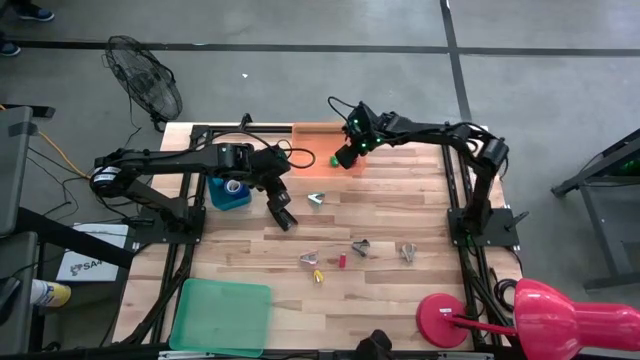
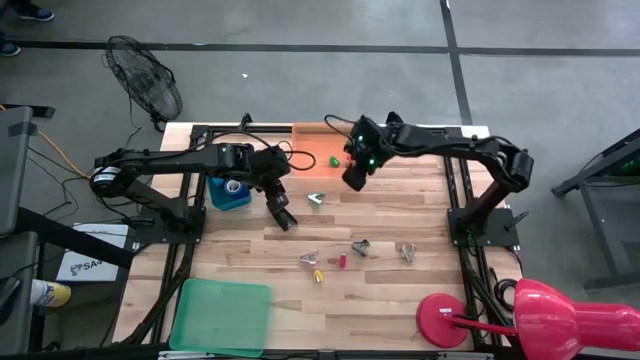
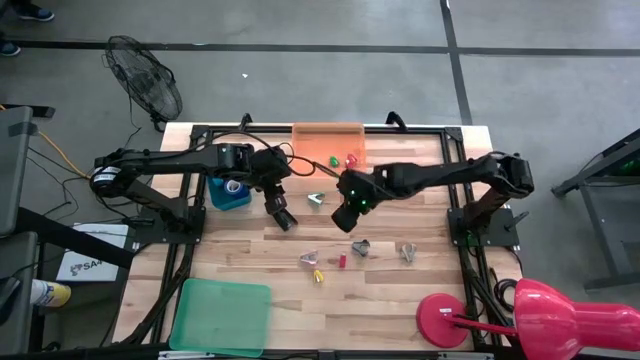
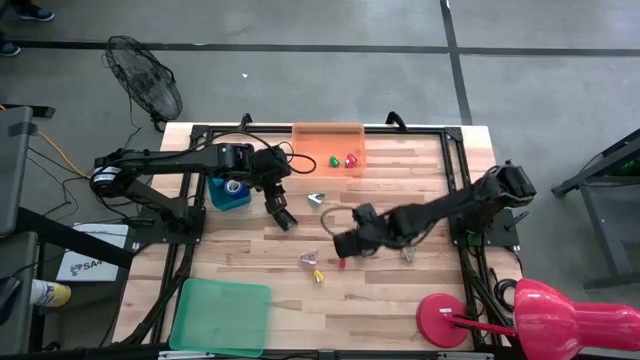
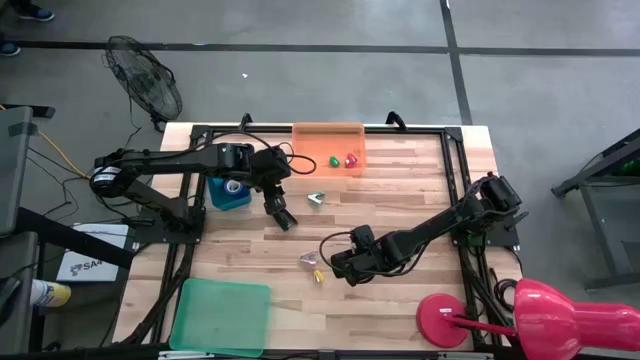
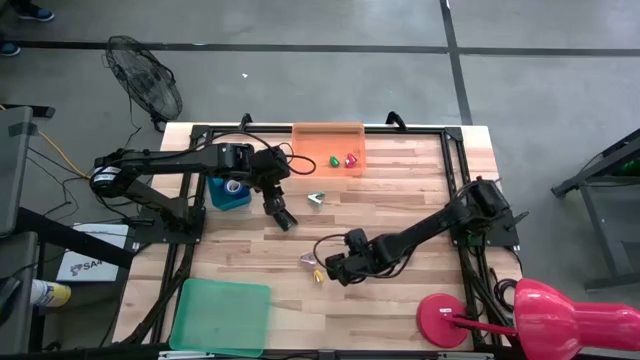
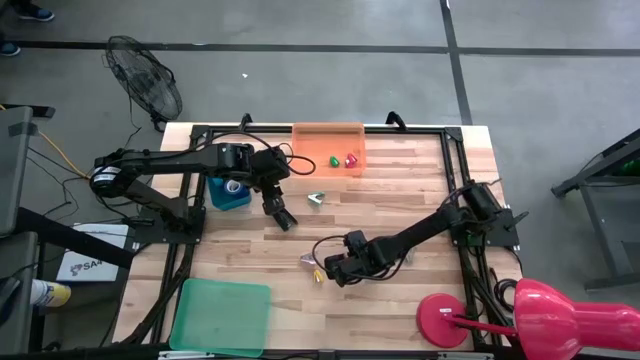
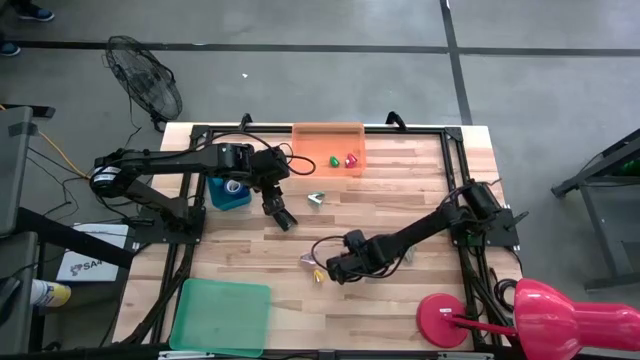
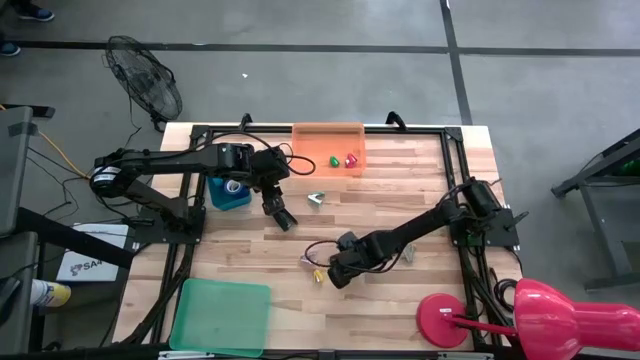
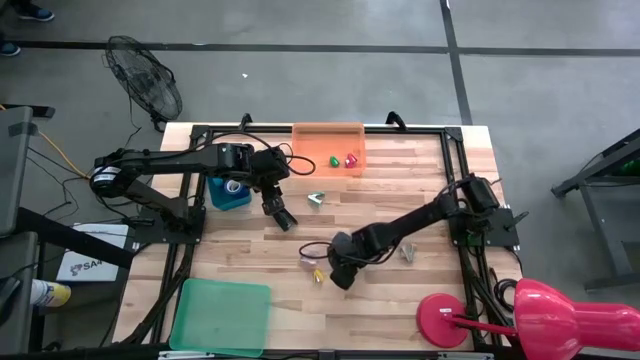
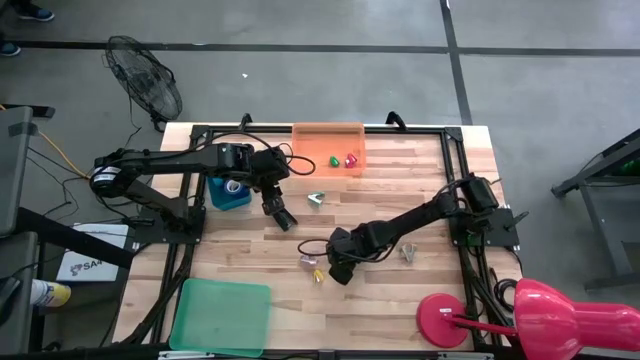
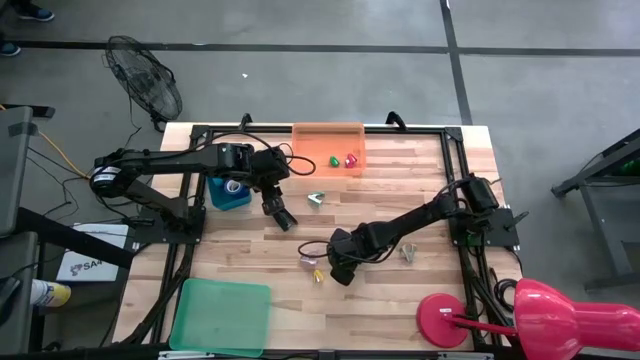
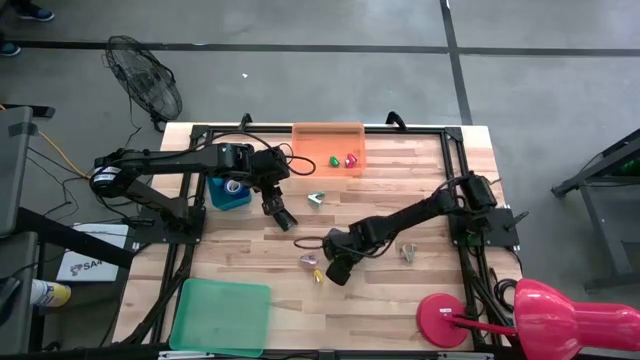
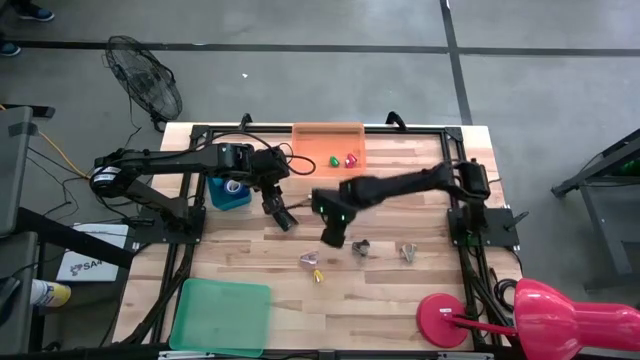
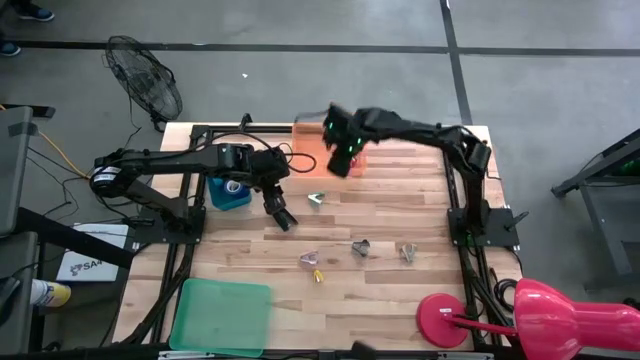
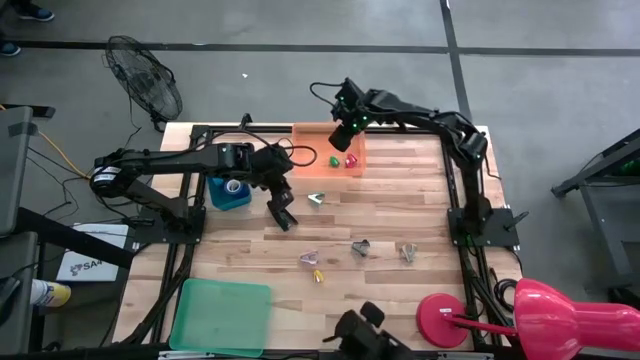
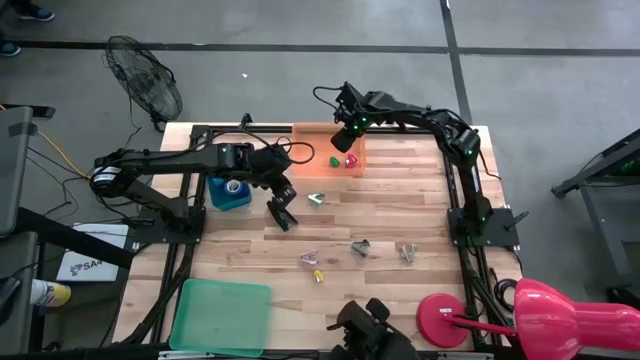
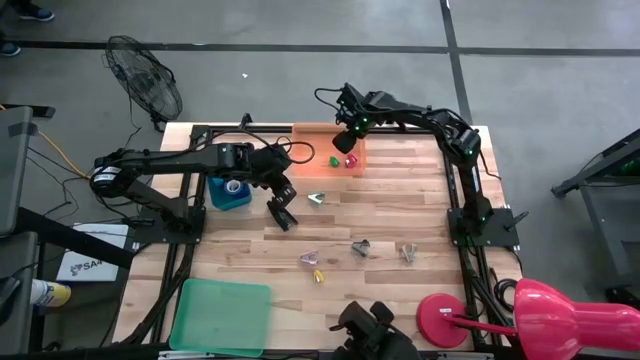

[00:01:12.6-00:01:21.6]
Task: Pick and place Stapler, Stapler remover, tape
Put the red stapler into the orange bin

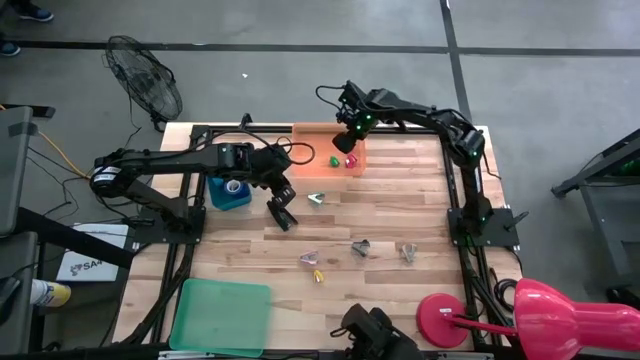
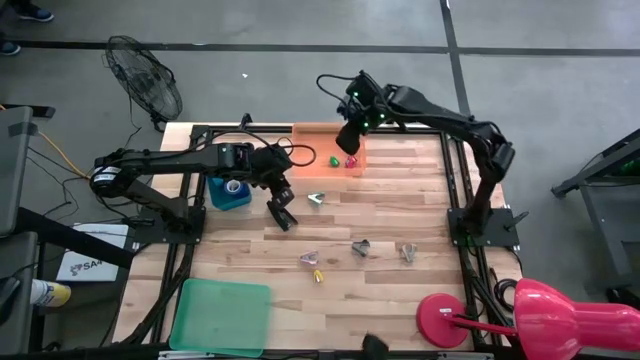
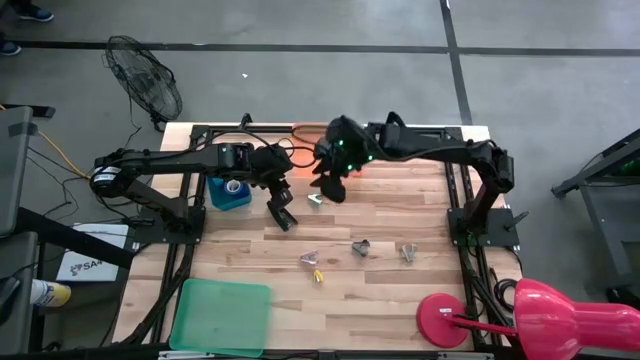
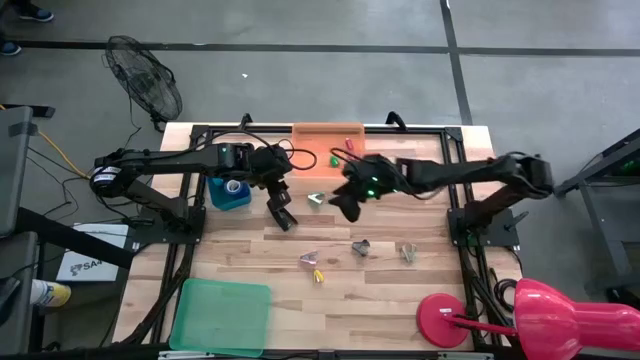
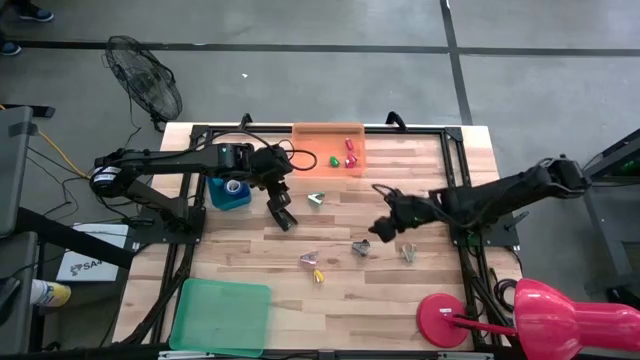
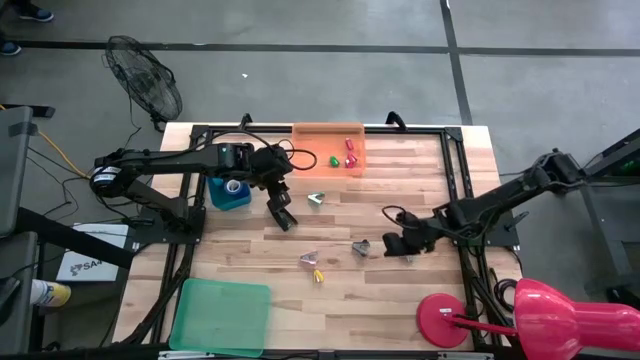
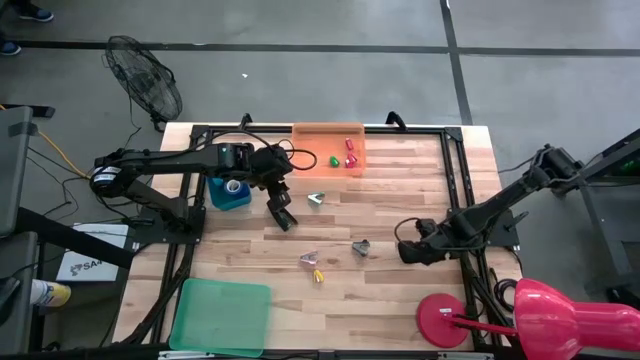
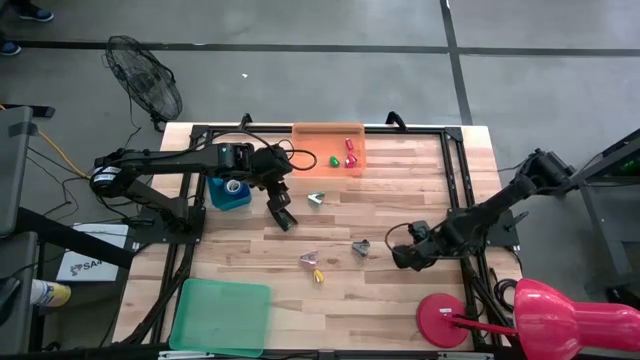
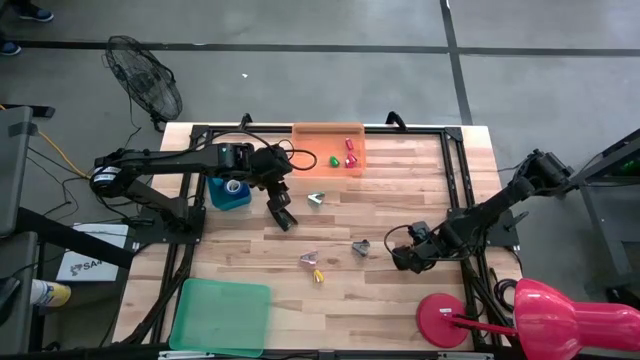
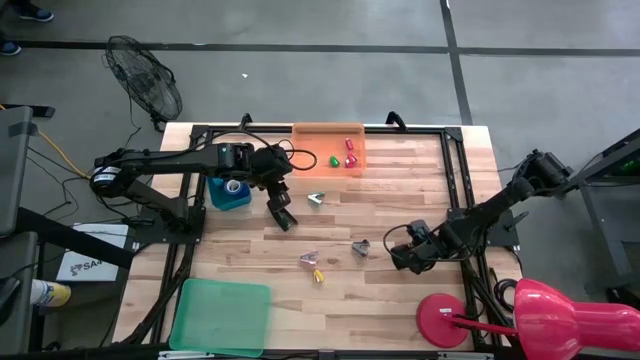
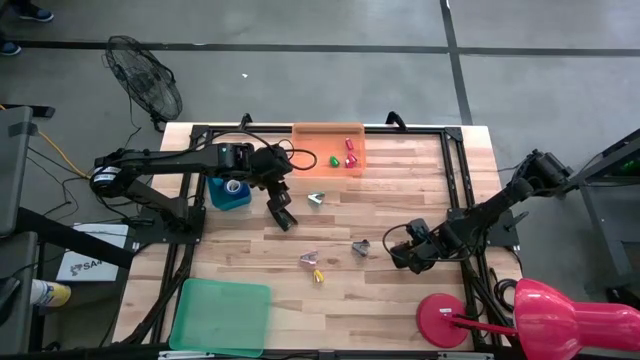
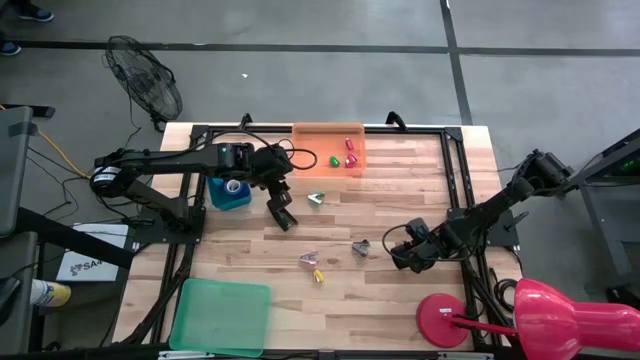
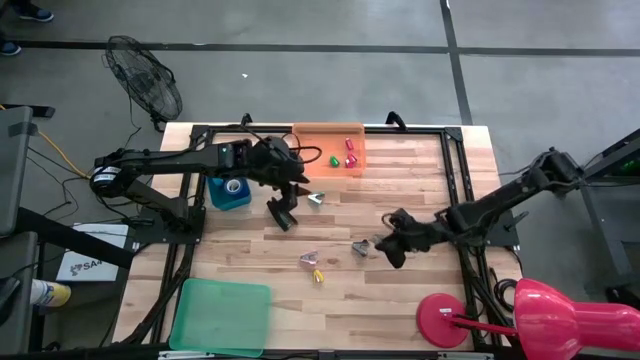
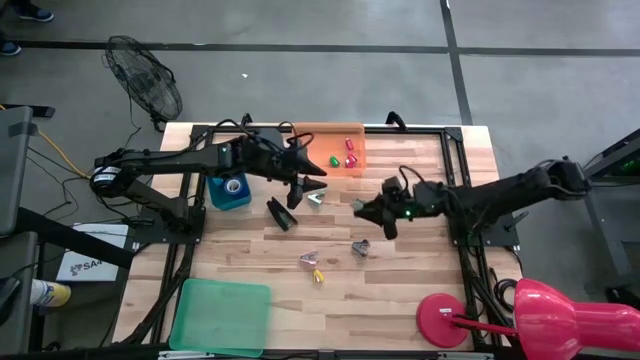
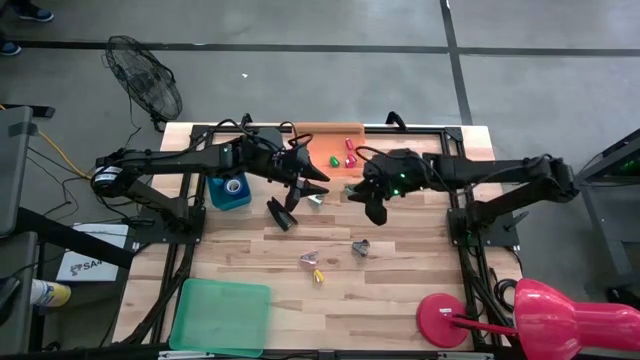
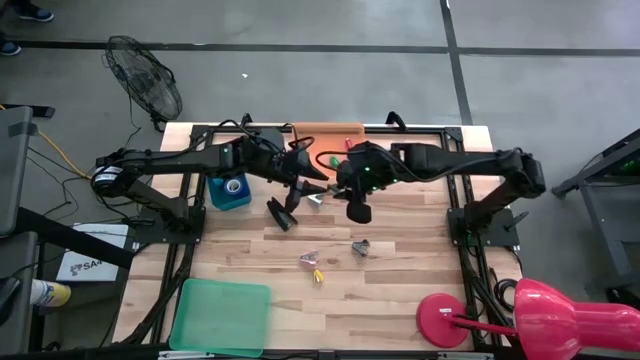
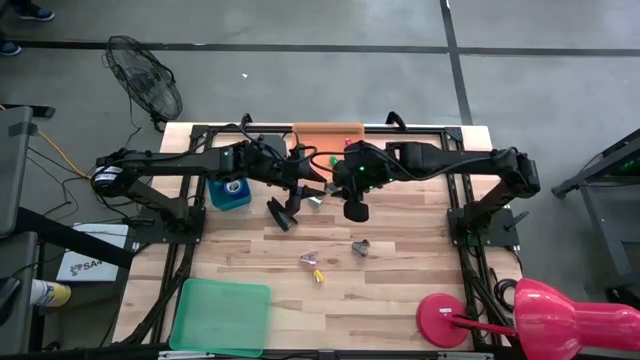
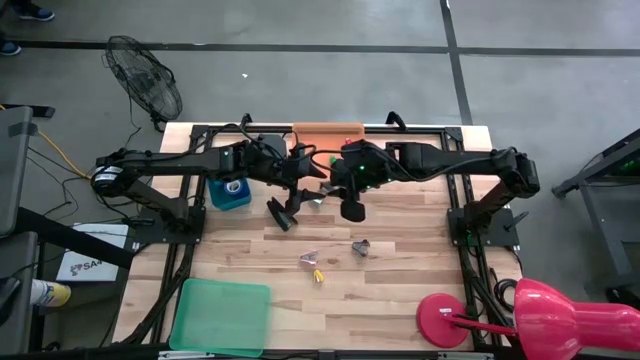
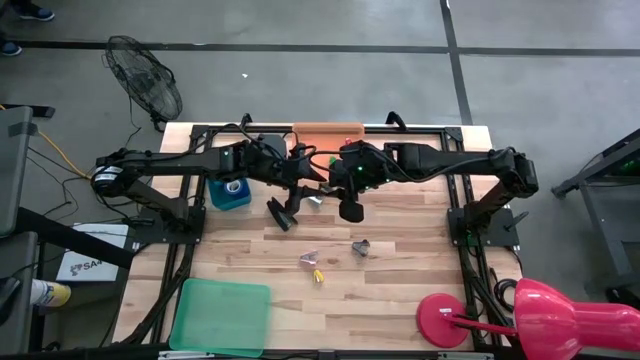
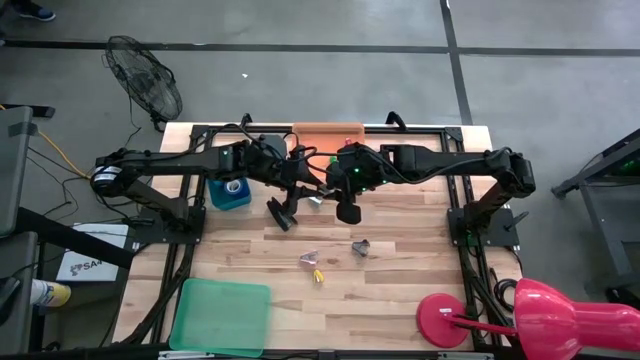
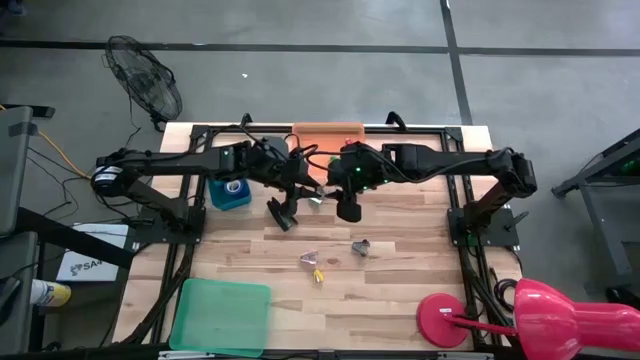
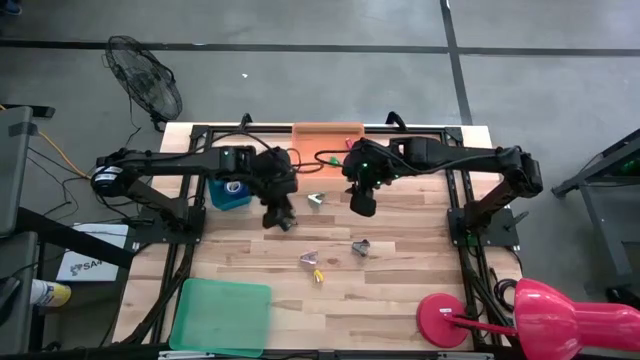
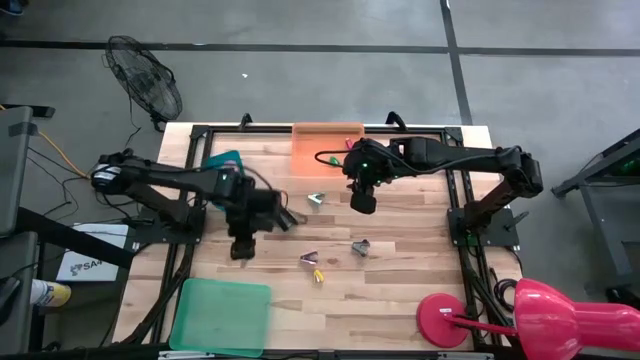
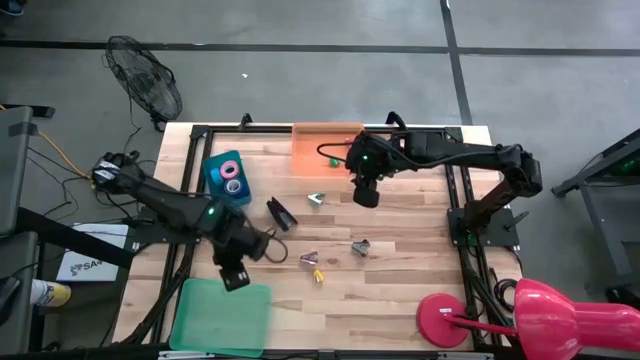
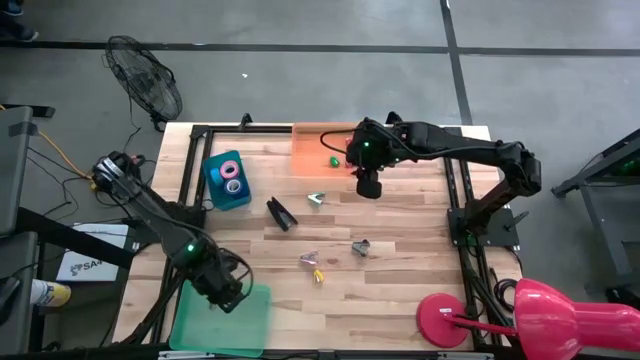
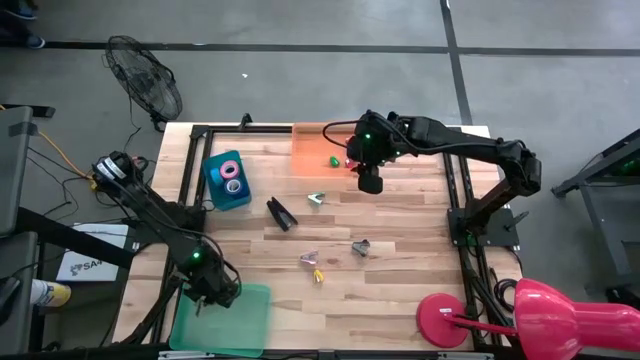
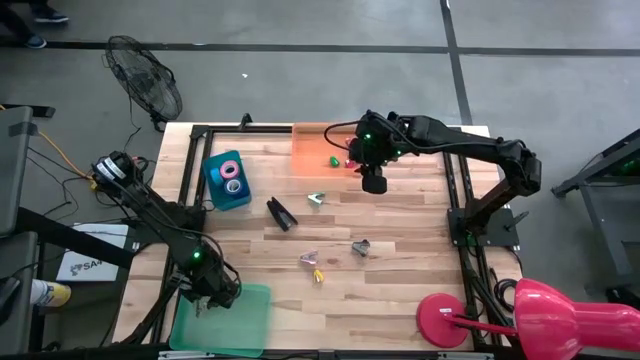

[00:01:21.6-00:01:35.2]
Put the gray staple remover into the green bin
